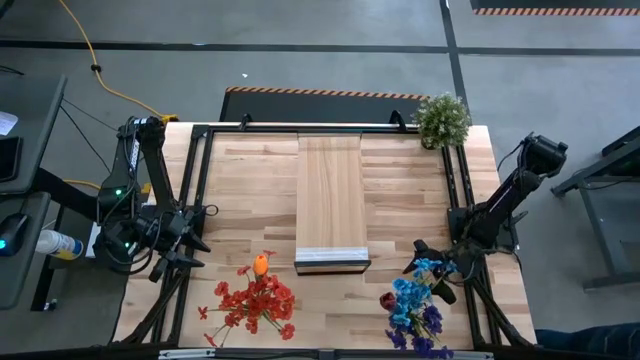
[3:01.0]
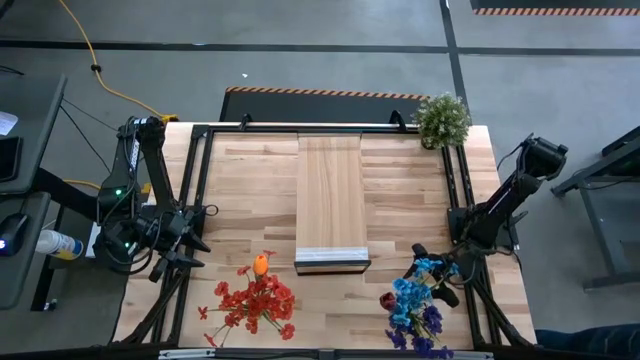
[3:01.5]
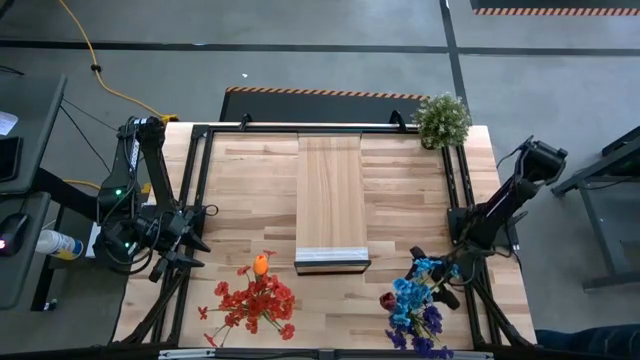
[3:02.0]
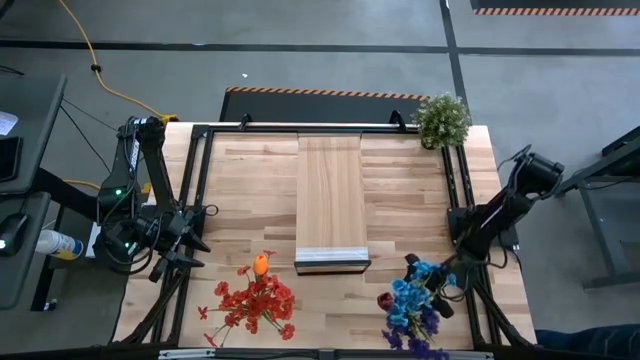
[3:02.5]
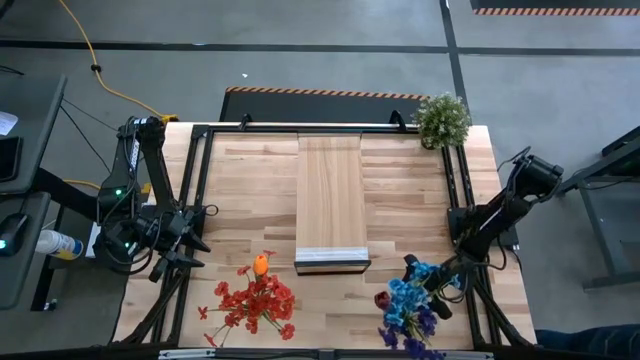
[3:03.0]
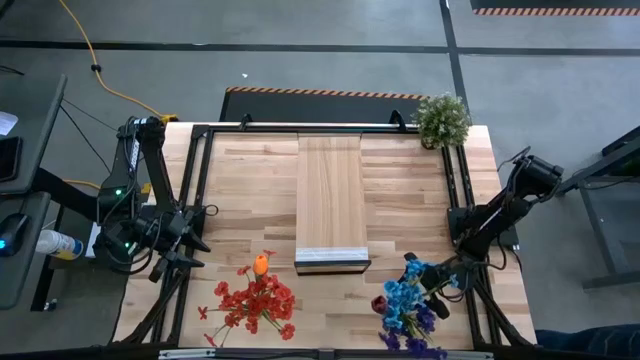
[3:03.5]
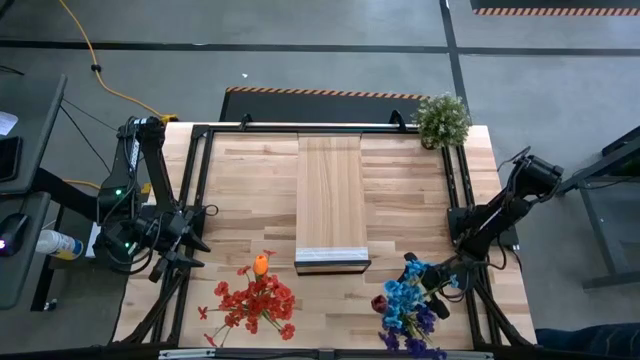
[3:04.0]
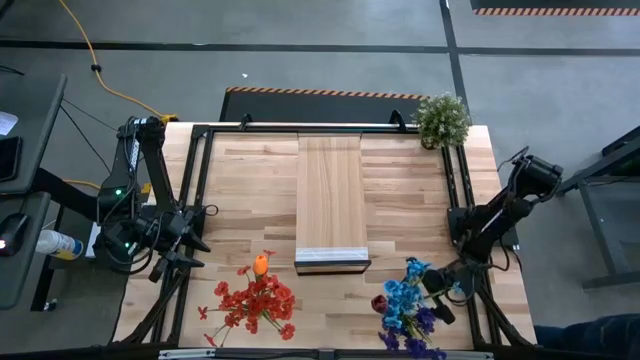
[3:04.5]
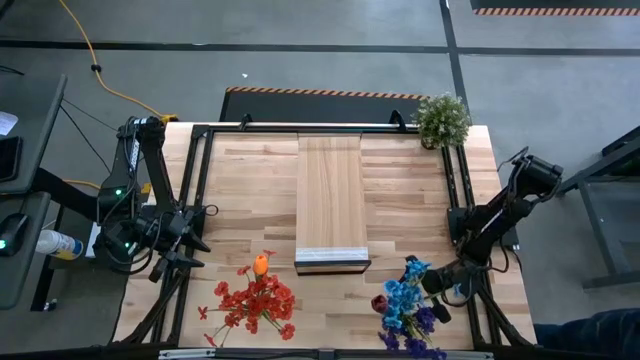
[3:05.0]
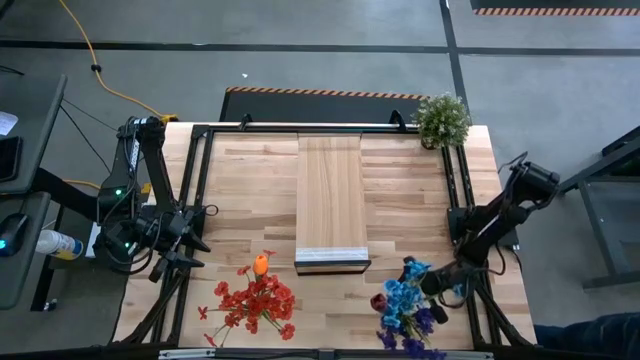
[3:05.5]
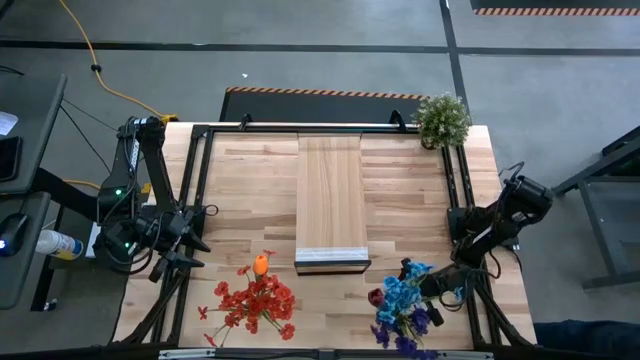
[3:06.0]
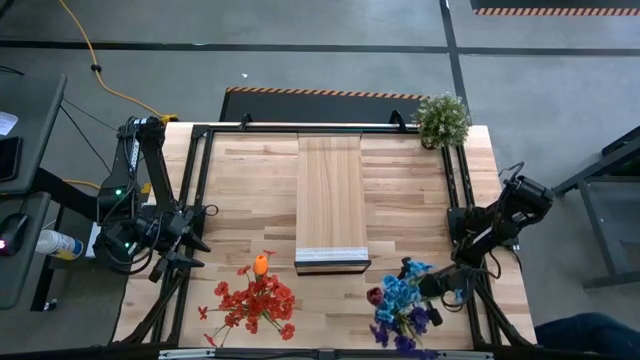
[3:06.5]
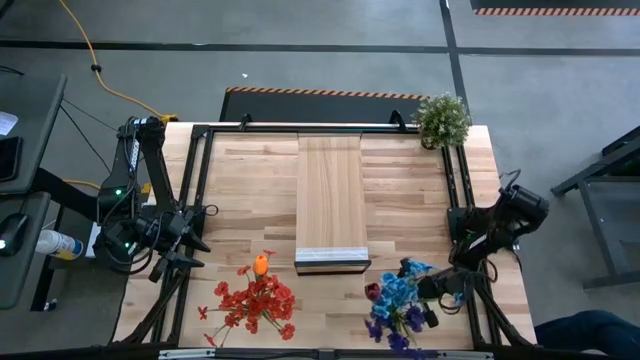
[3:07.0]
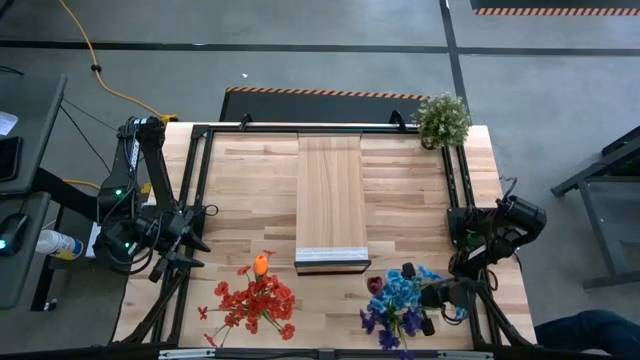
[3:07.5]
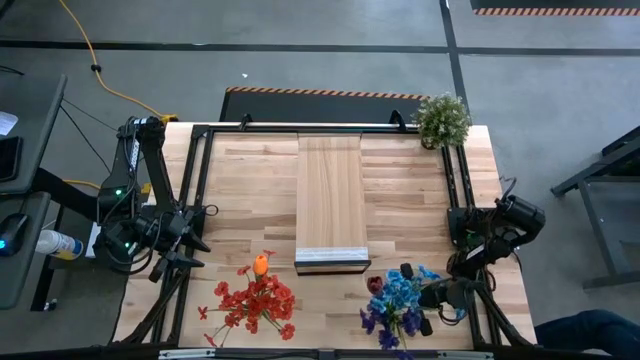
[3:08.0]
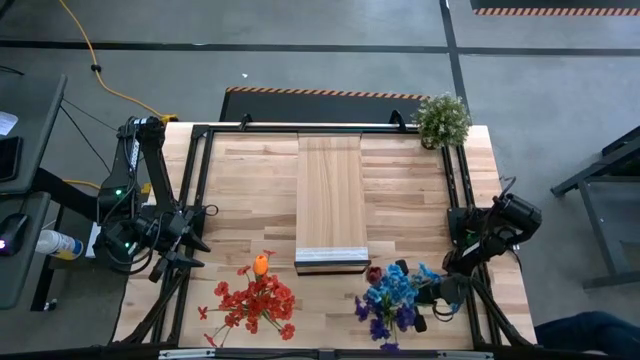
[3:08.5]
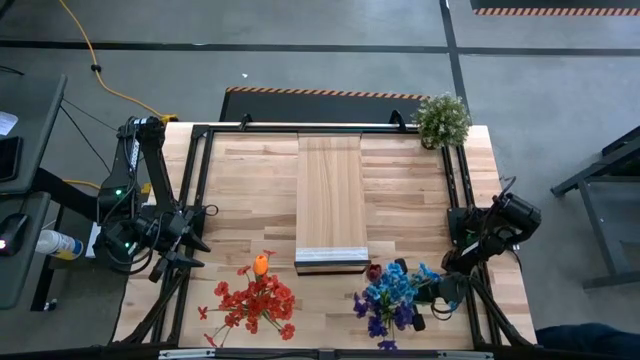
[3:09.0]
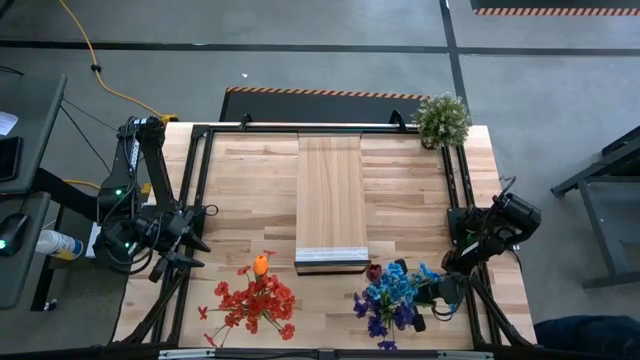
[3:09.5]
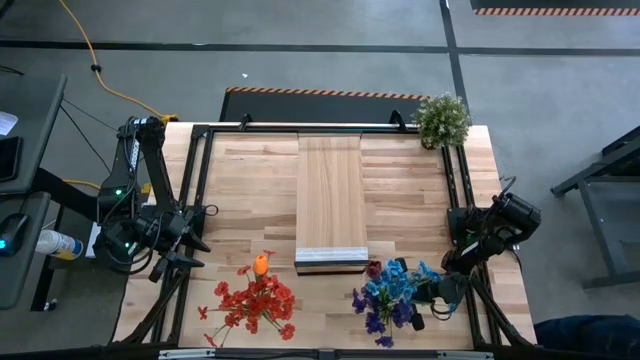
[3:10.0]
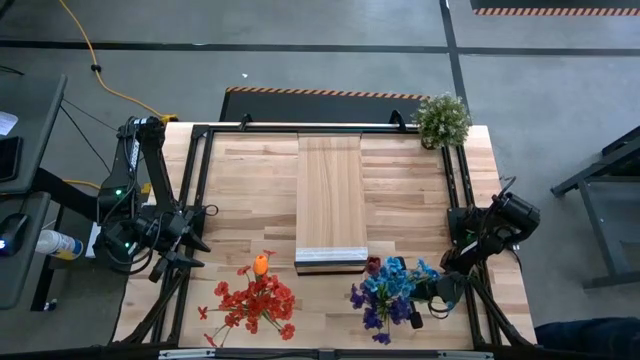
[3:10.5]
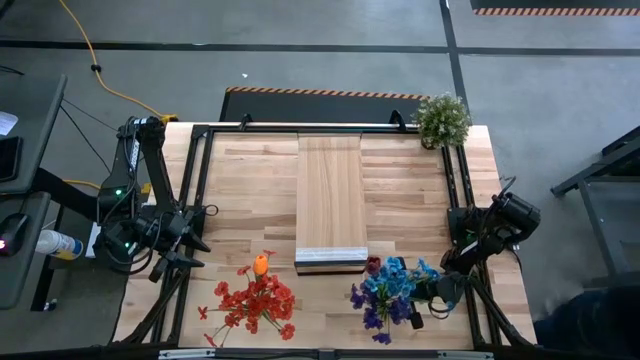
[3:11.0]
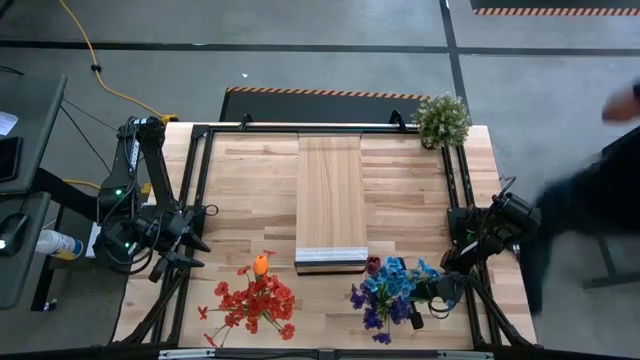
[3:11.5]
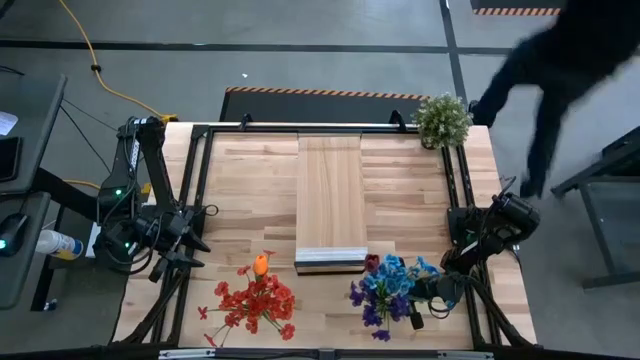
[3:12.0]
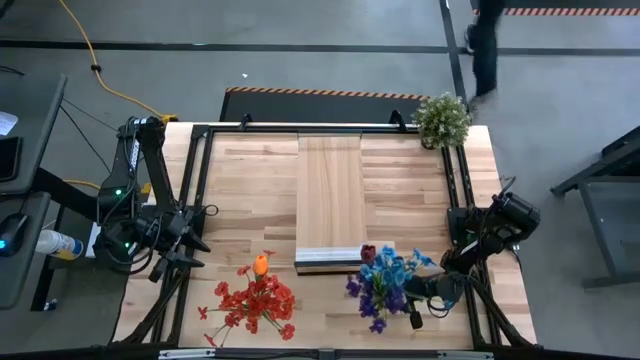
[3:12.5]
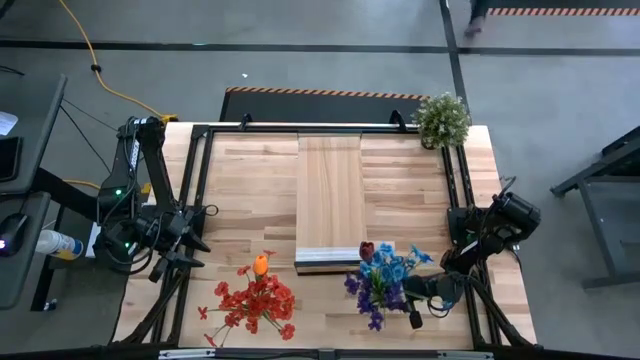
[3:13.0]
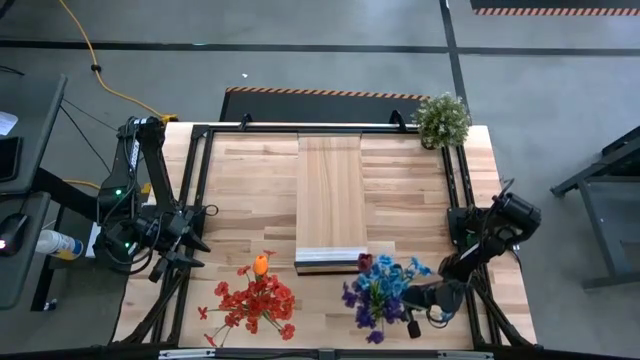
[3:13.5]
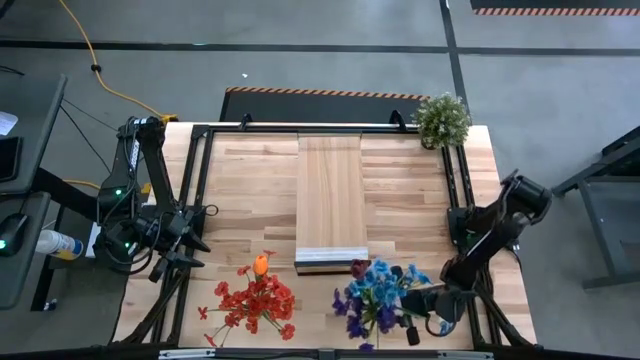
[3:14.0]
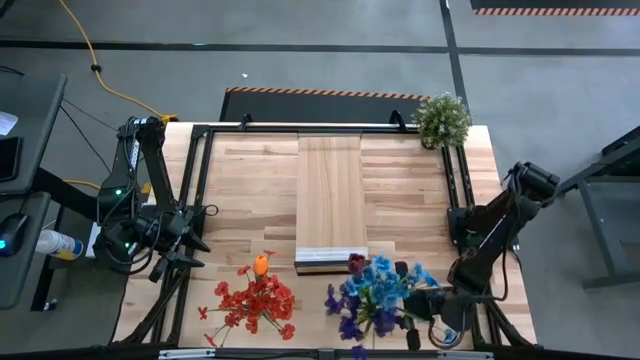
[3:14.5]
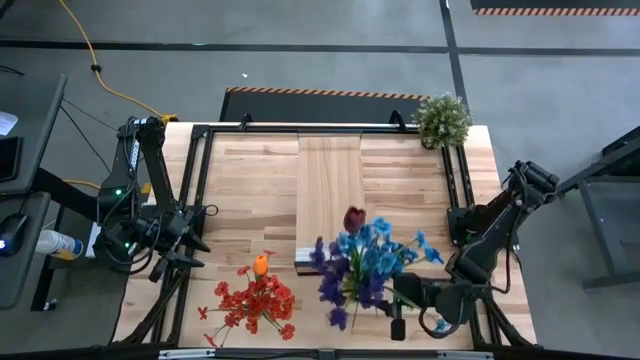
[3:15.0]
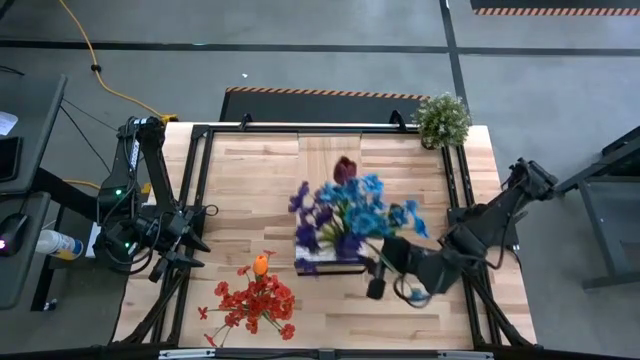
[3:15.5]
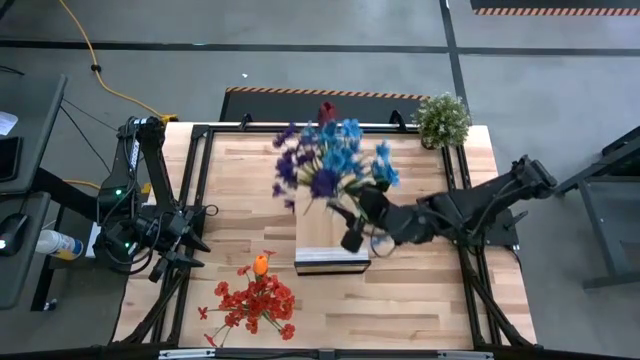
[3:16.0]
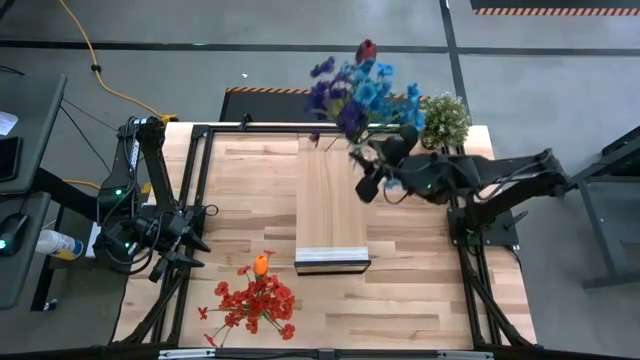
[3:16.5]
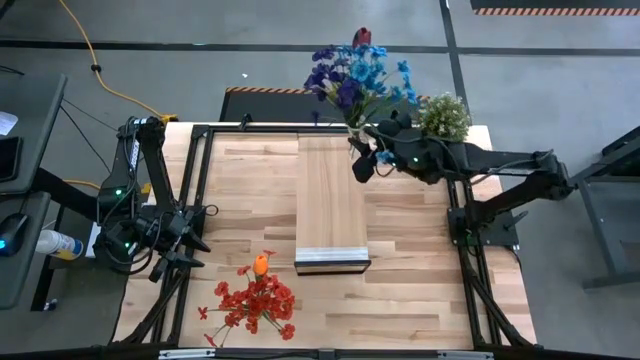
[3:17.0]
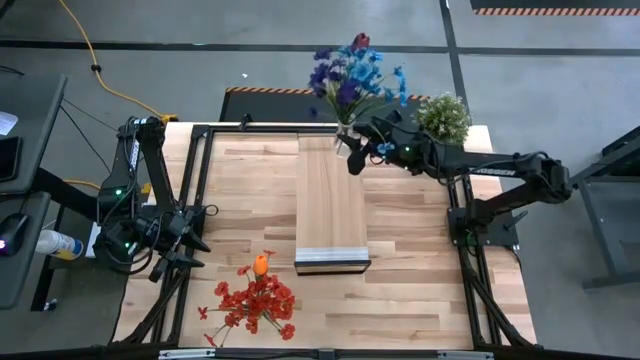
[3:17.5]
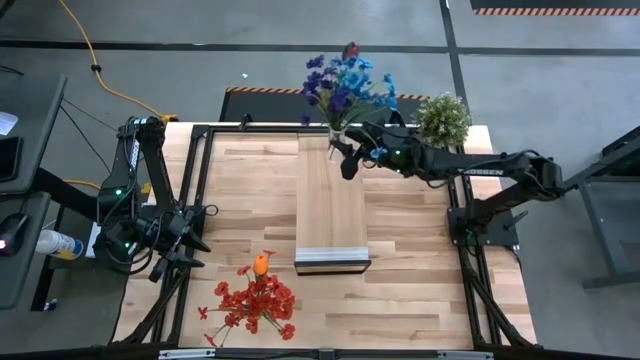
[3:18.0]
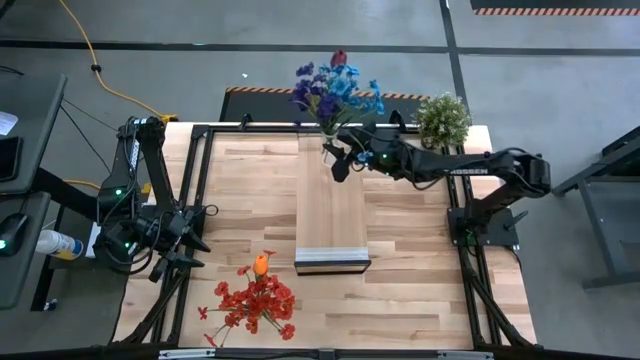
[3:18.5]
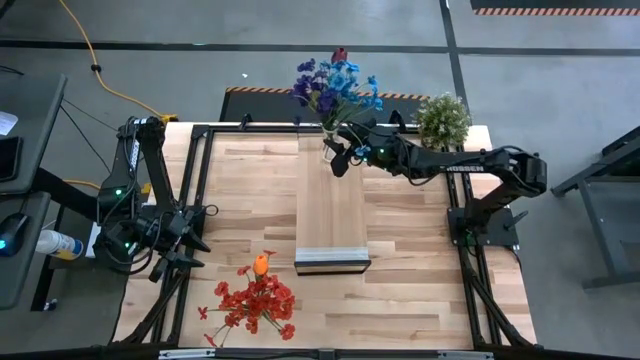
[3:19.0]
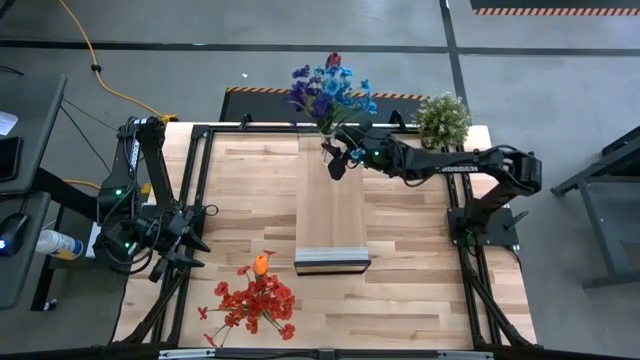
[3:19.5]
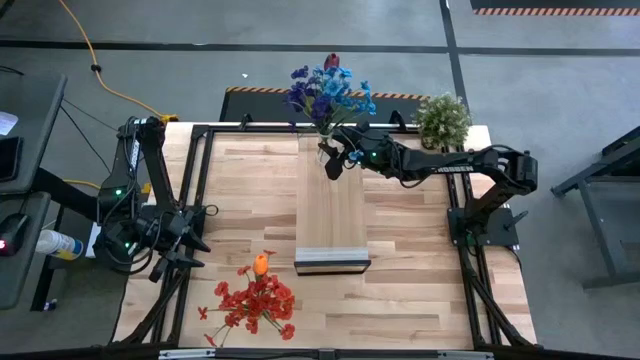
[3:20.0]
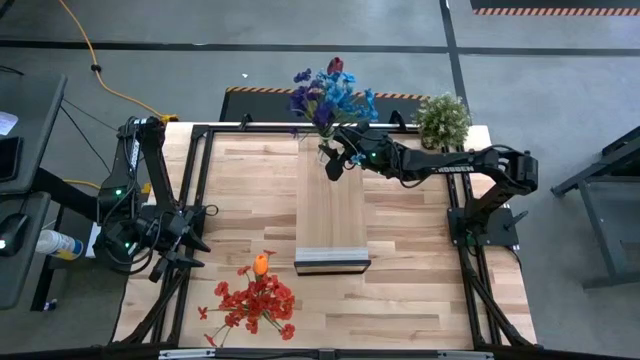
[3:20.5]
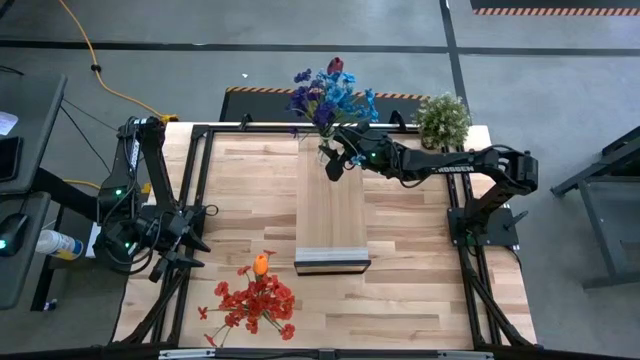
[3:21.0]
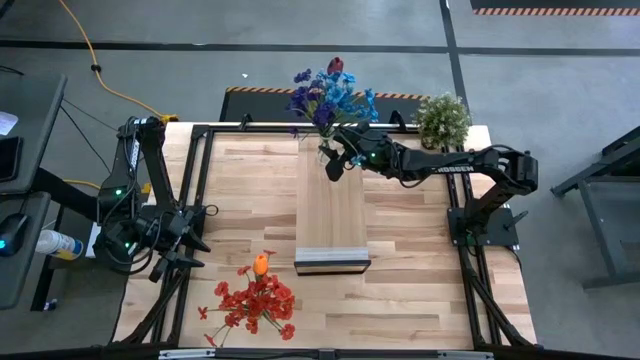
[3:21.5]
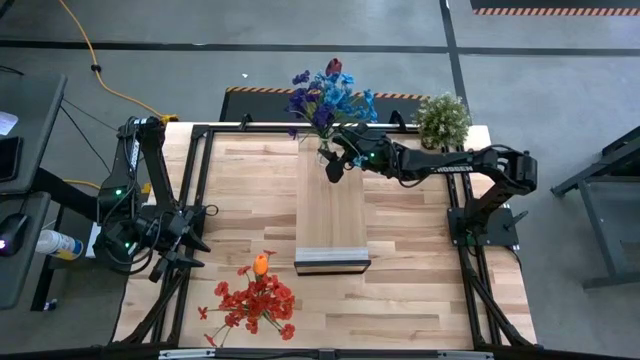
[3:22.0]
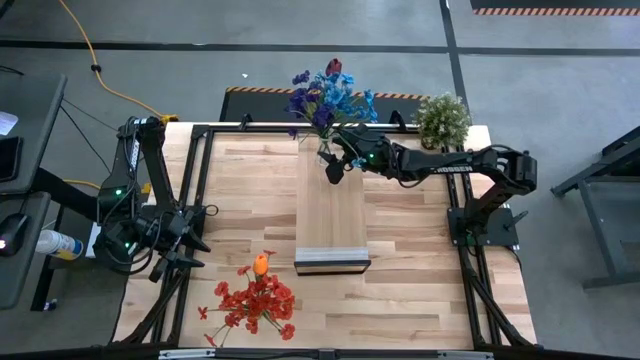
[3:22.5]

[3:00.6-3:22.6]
Task: Pick and place flowers into a vace then onto a shelf
Put the right transparent vase with the flowers on the shelf
